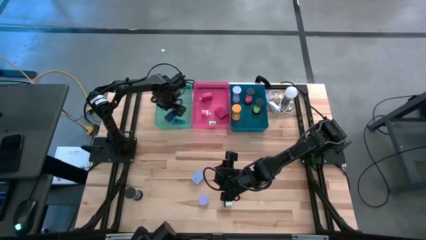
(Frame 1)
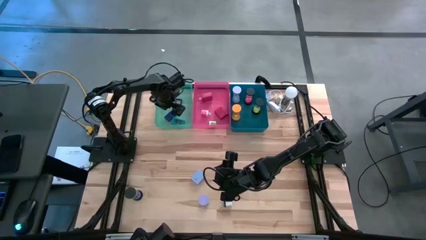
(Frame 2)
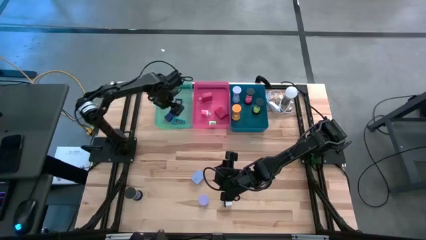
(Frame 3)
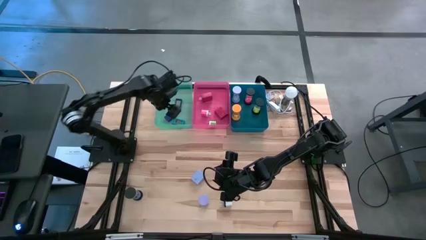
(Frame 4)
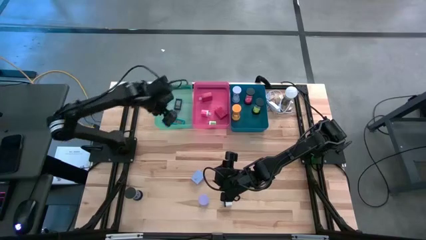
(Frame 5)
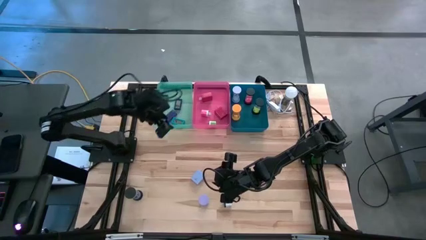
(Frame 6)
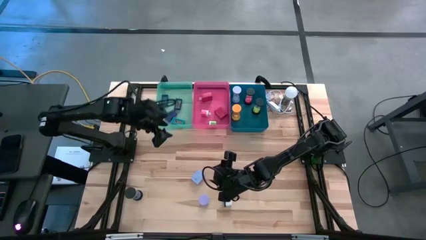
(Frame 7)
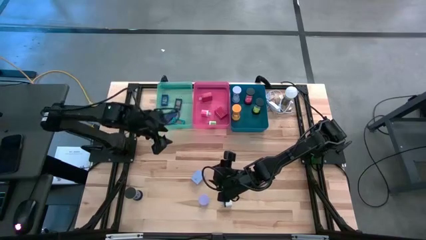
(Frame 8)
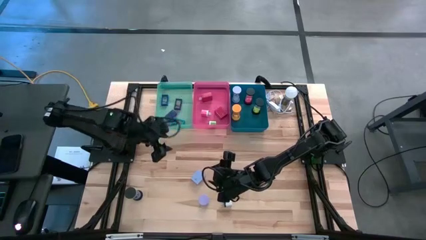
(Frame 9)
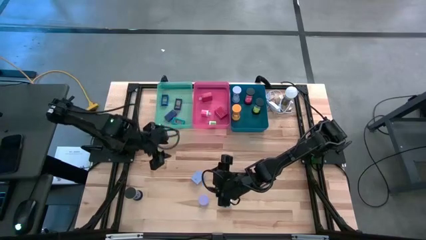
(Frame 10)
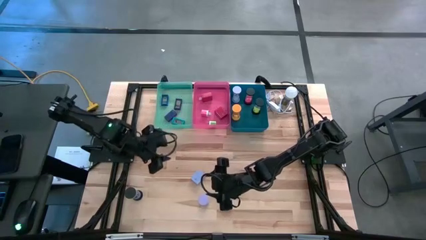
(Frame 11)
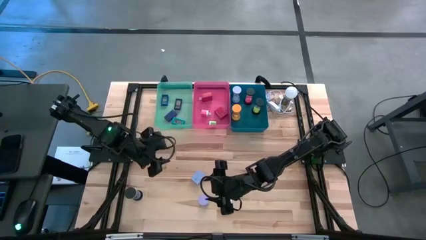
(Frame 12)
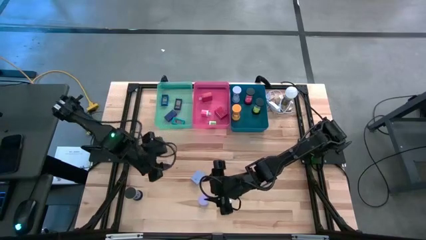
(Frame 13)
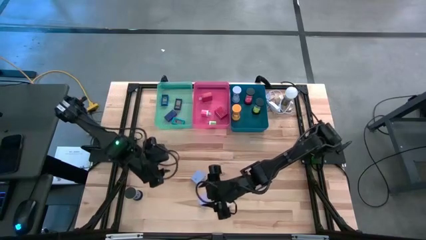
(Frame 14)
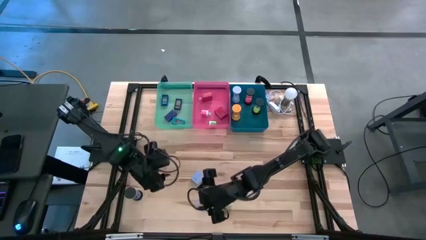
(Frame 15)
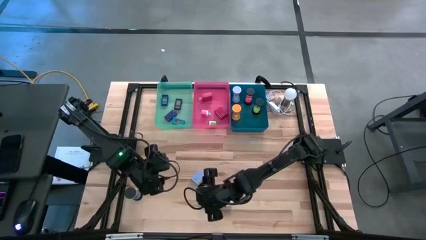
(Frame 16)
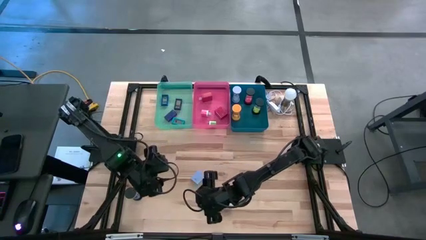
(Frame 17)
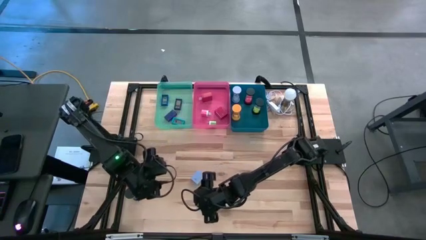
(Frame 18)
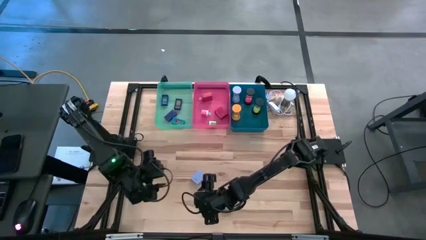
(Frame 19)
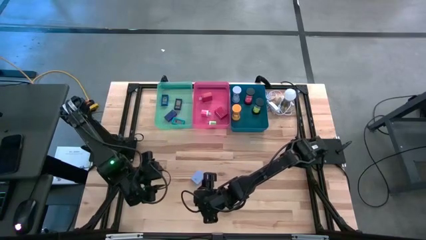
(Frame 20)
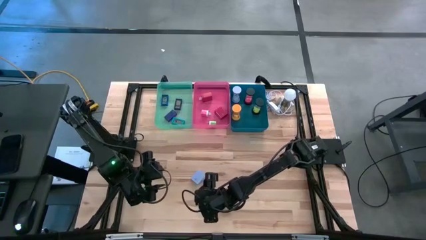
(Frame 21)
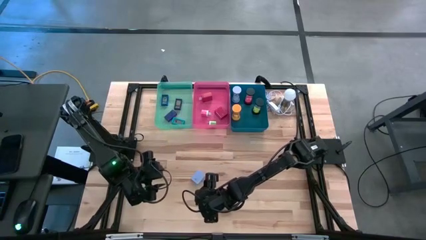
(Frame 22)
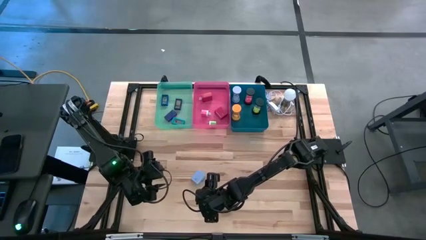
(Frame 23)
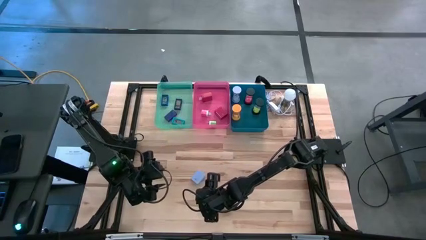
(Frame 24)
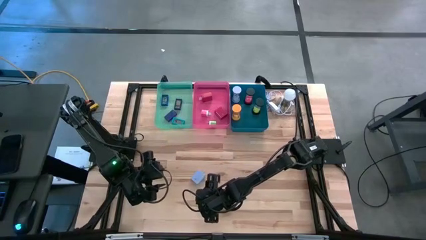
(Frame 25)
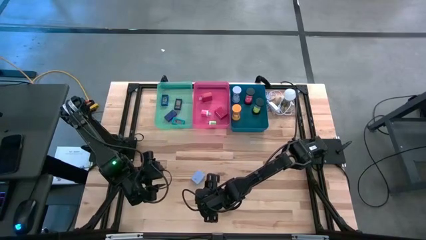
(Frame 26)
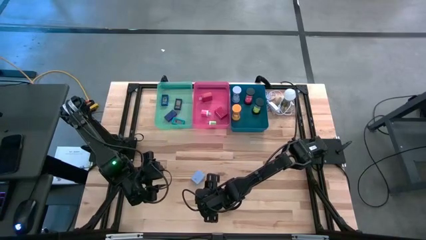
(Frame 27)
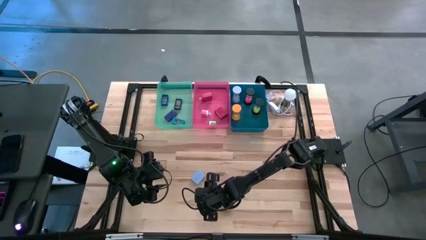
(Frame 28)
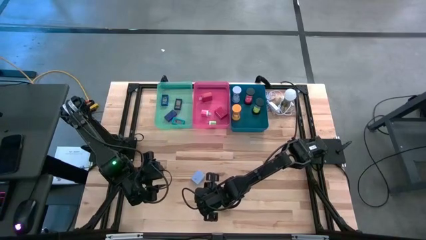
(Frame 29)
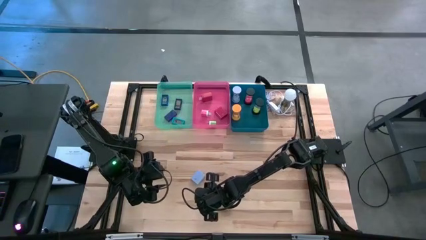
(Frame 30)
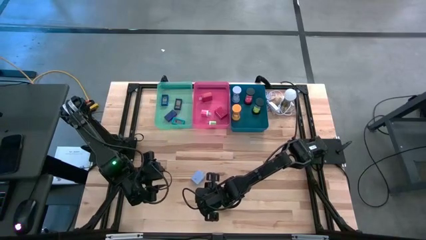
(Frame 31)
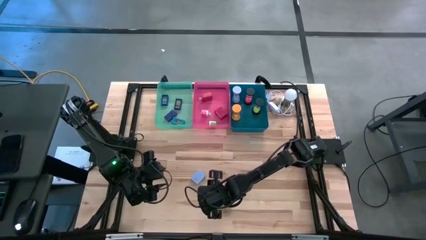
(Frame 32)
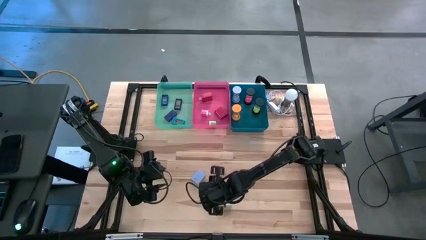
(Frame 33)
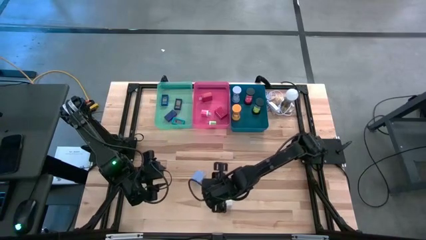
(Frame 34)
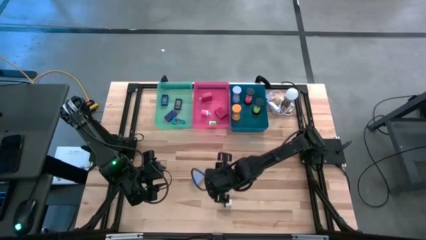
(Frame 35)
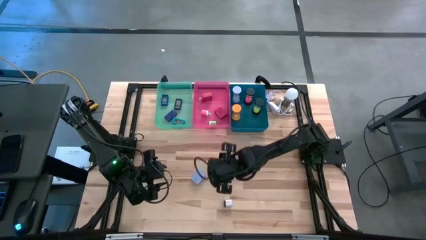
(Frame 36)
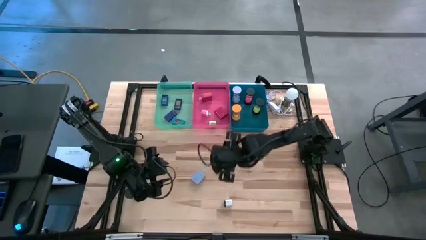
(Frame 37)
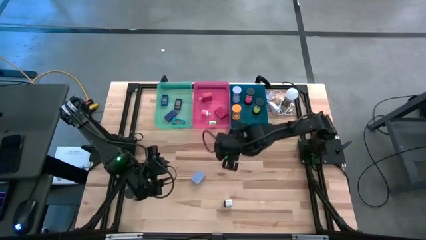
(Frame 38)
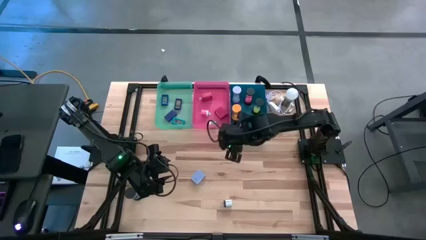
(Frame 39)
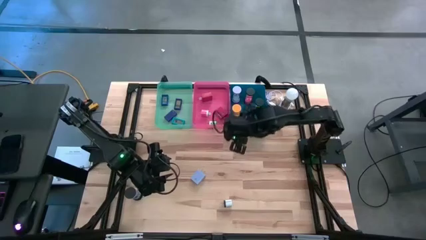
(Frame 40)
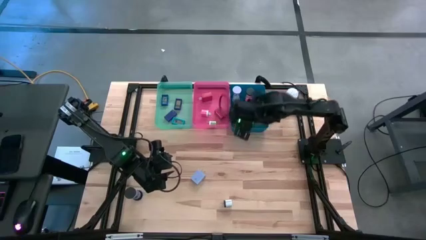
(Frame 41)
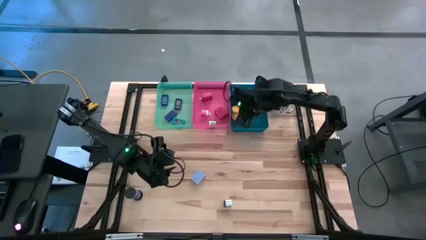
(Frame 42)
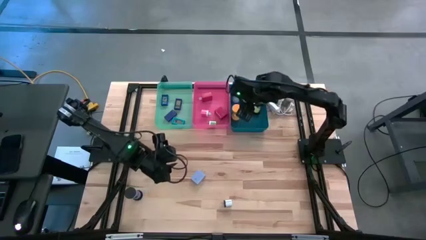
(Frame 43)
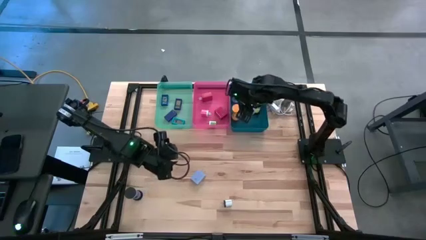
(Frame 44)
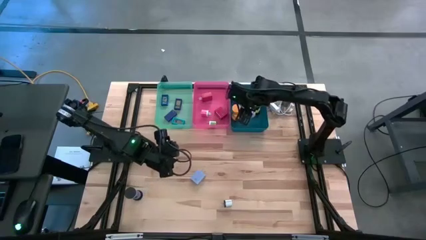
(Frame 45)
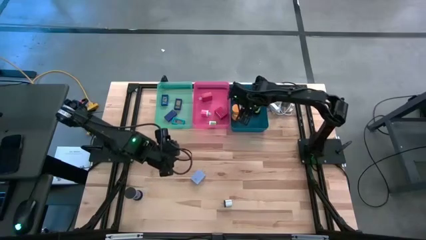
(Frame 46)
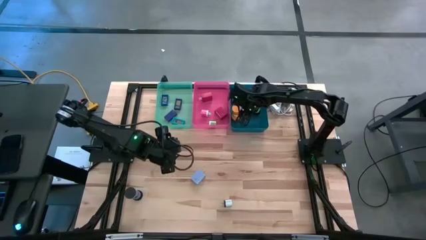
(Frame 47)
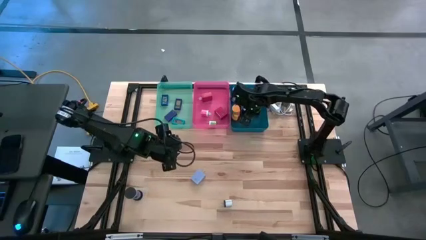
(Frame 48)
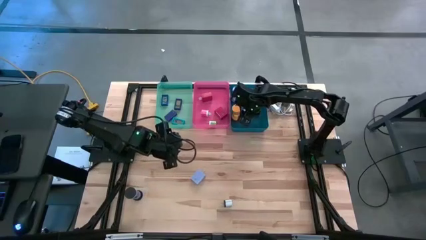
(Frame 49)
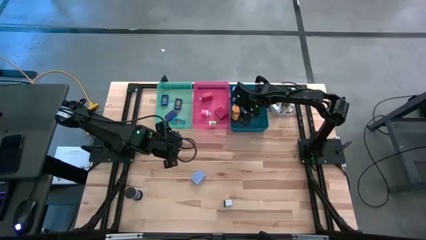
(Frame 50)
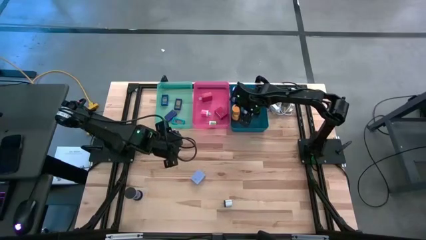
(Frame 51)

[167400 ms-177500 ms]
Task: Pick & Place Office items
Put the light purple hourglass into the dark blue bin

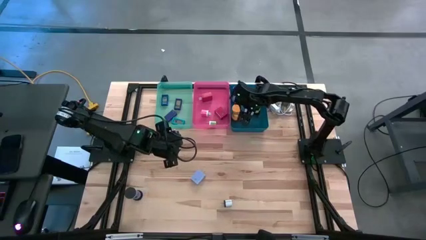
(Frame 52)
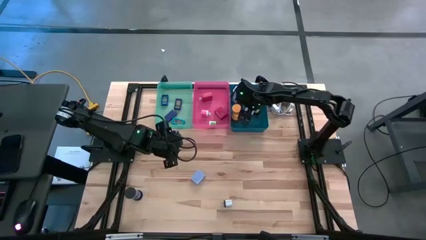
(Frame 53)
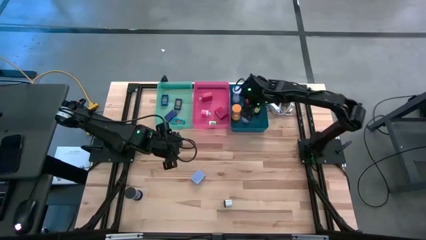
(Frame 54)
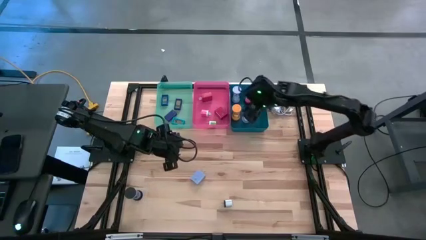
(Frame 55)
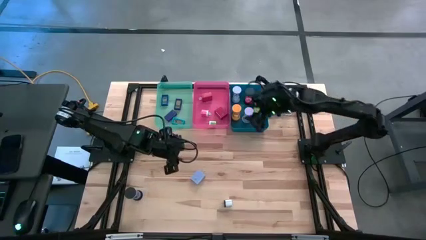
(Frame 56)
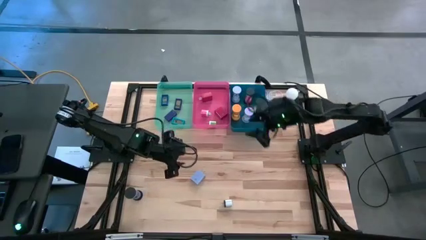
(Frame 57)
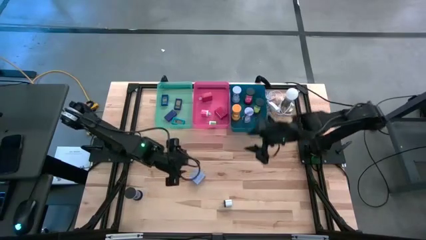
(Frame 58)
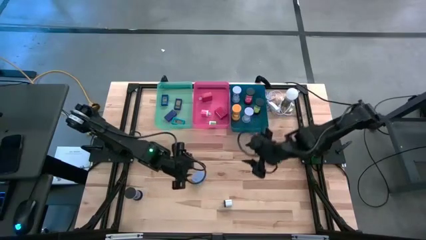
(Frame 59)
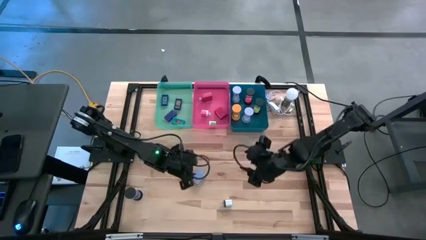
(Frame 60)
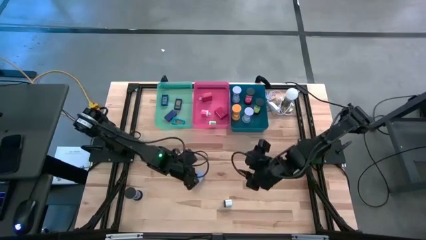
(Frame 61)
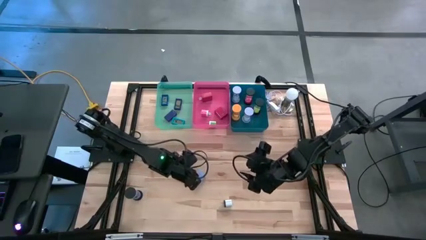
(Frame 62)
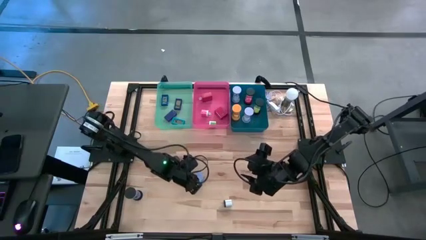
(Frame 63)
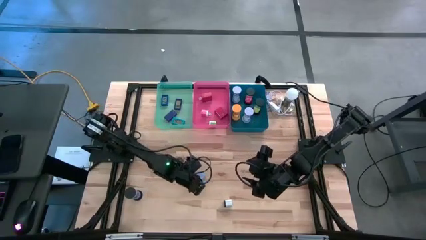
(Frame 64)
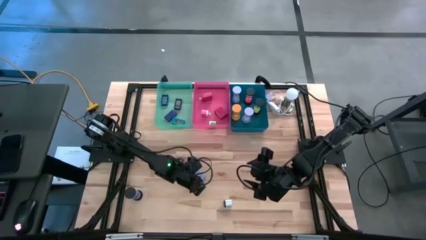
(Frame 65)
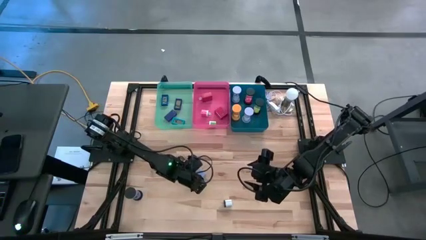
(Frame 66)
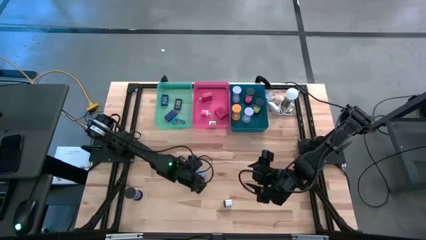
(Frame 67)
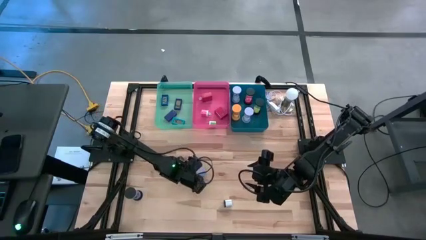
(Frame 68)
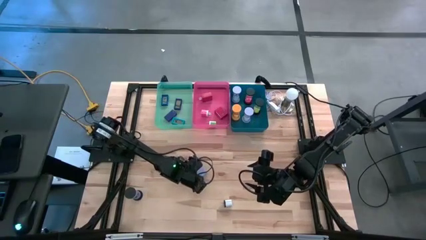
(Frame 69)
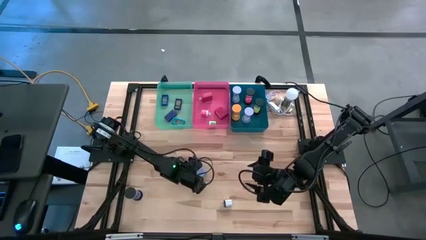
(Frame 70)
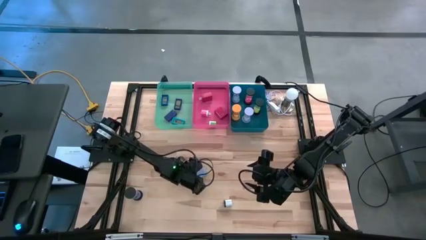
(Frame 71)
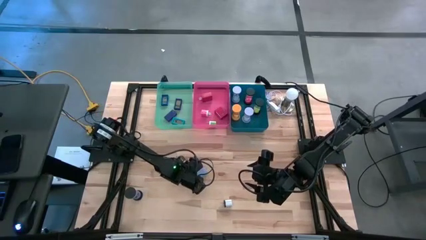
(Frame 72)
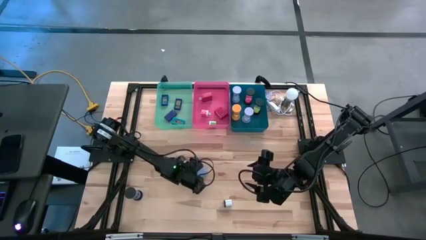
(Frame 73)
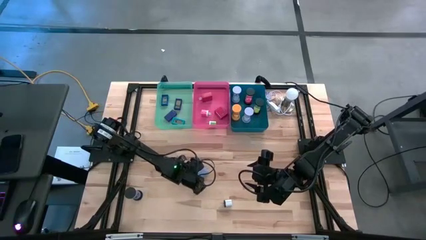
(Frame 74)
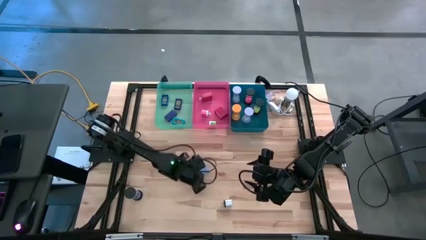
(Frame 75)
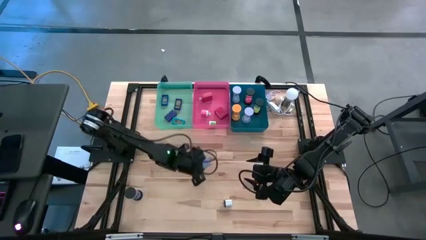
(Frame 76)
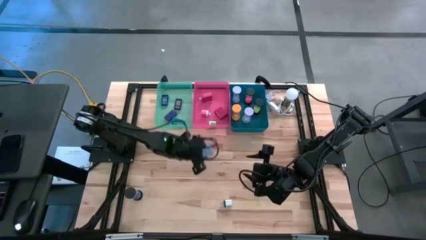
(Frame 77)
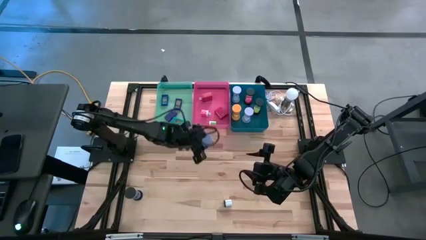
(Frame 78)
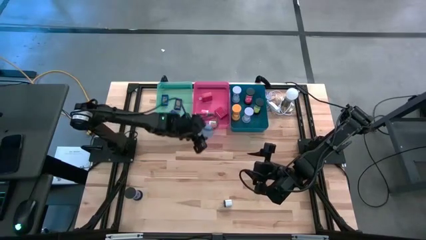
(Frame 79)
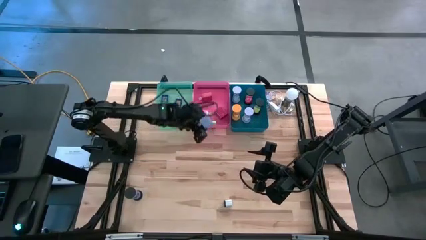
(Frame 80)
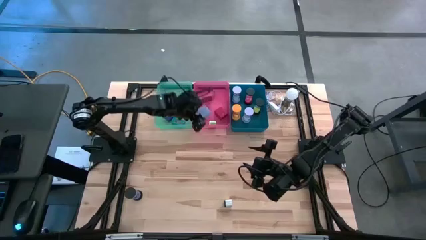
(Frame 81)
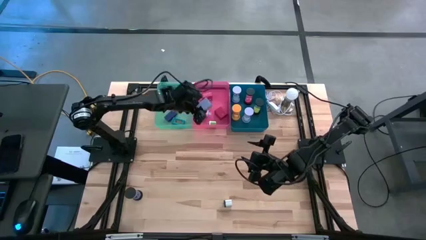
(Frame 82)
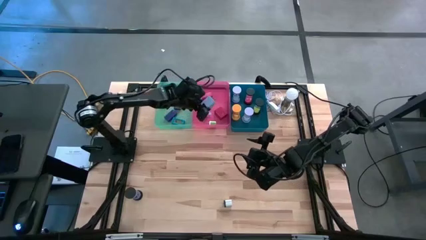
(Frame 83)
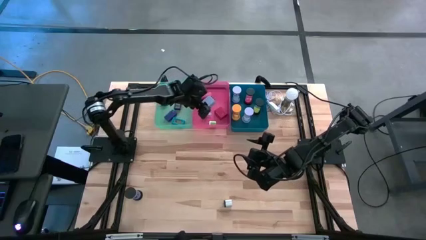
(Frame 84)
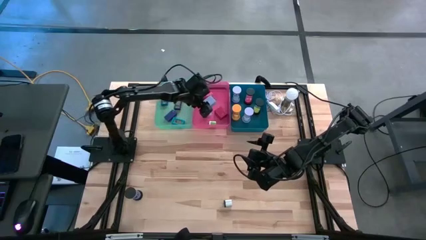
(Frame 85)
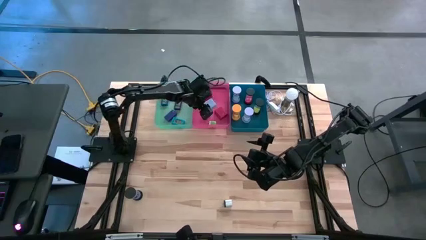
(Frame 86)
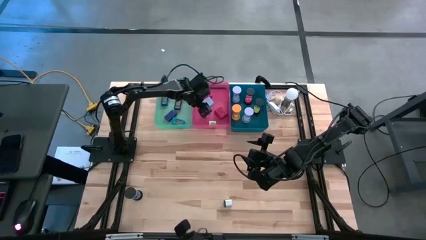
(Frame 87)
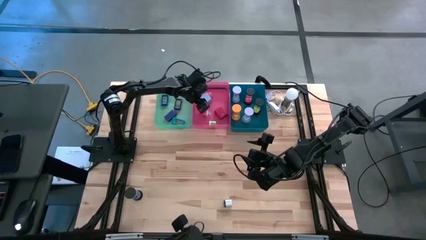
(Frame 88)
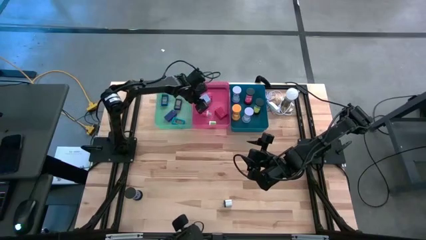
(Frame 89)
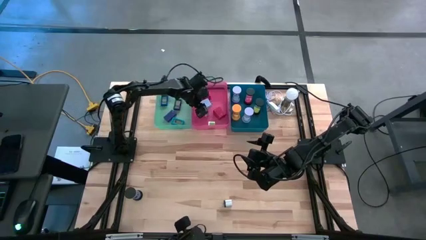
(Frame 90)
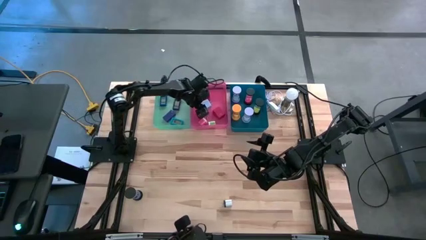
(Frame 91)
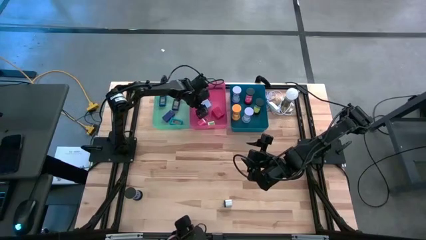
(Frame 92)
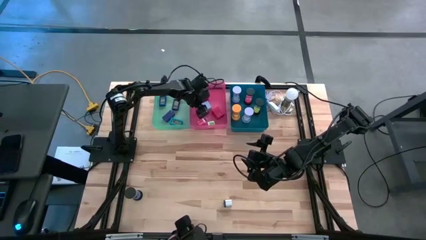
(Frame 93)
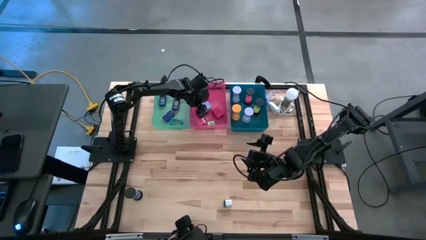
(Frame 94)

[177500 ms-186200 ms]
Put the light blue adapter into the red bin
